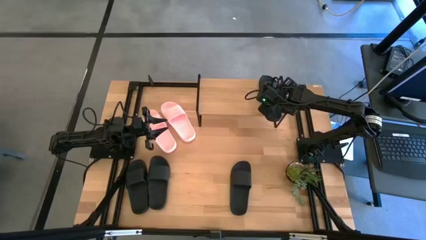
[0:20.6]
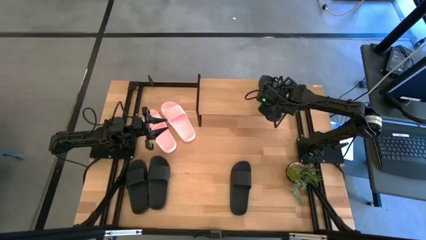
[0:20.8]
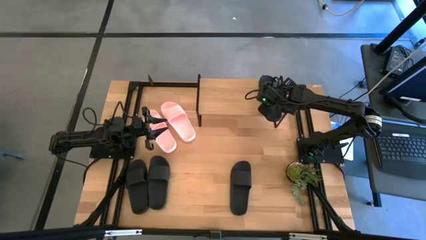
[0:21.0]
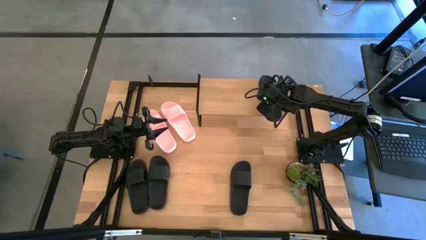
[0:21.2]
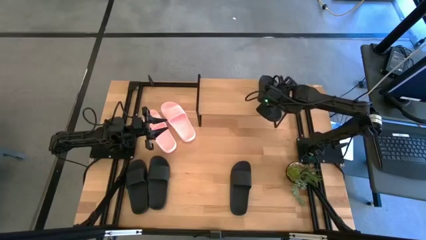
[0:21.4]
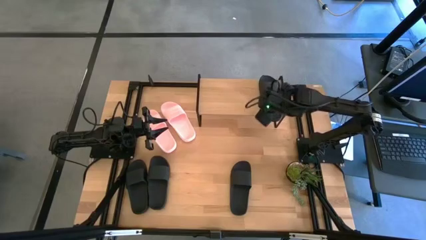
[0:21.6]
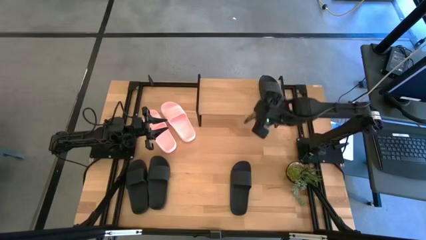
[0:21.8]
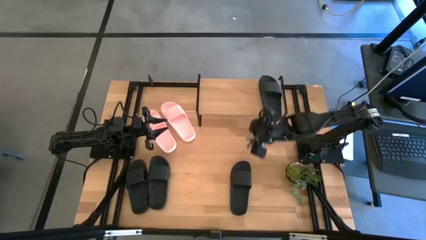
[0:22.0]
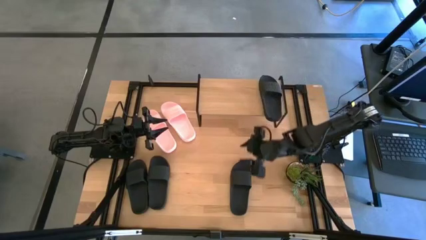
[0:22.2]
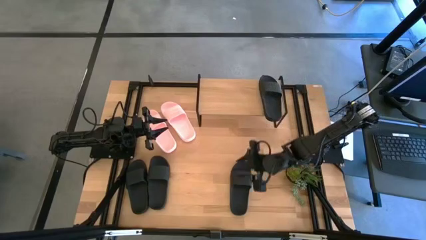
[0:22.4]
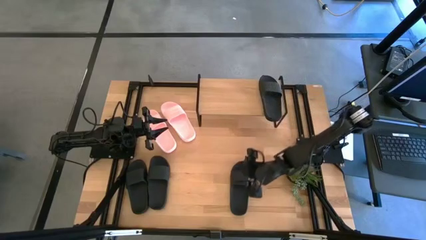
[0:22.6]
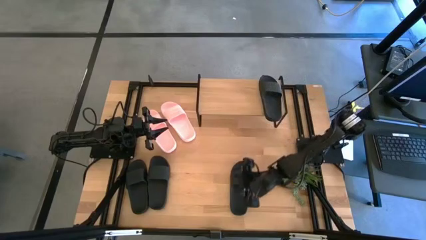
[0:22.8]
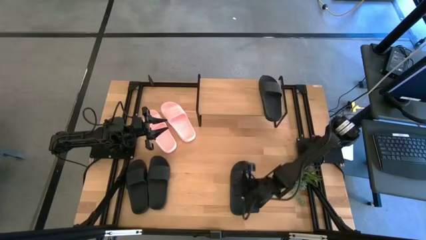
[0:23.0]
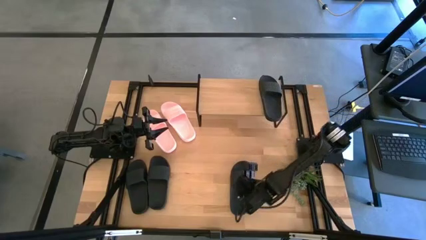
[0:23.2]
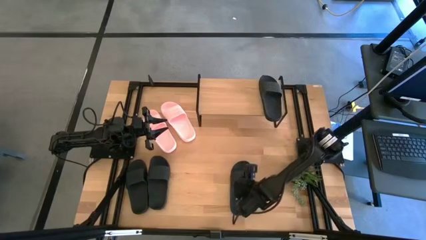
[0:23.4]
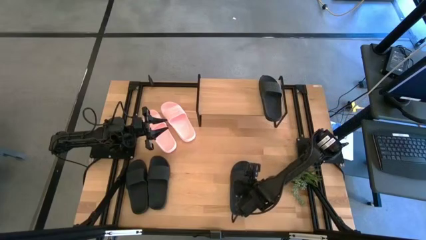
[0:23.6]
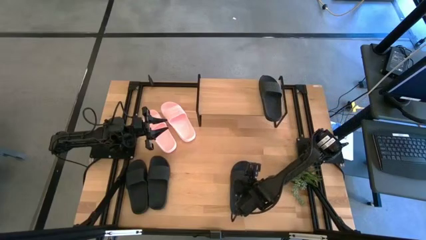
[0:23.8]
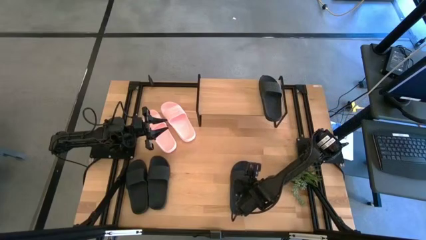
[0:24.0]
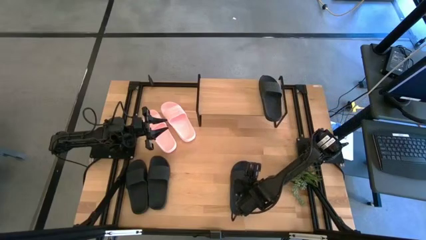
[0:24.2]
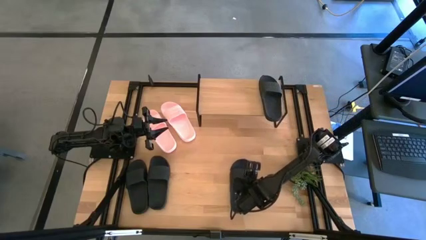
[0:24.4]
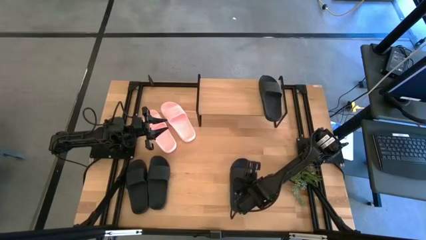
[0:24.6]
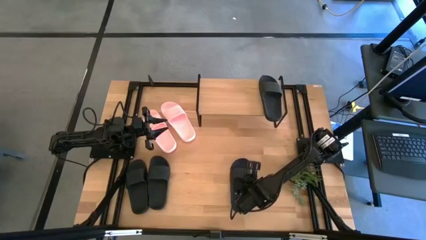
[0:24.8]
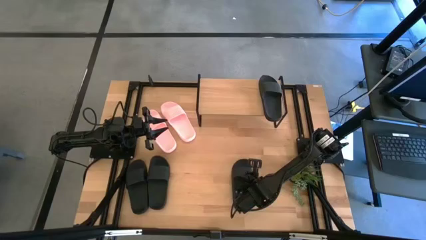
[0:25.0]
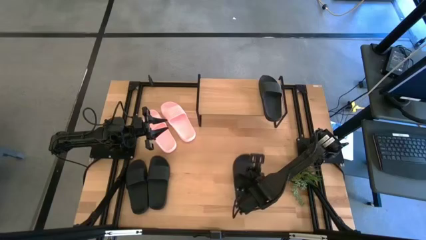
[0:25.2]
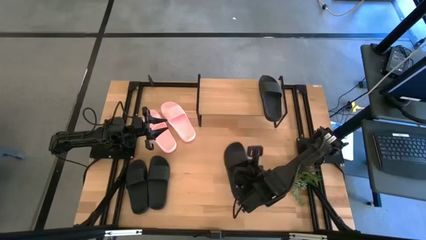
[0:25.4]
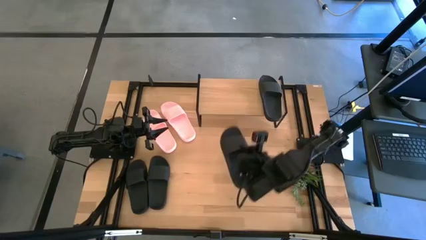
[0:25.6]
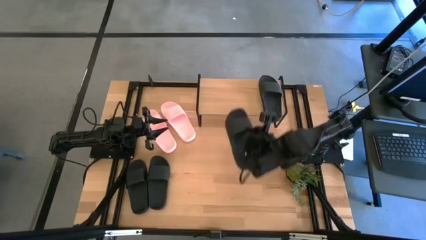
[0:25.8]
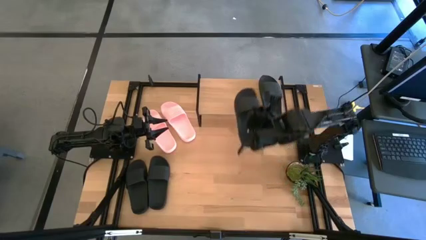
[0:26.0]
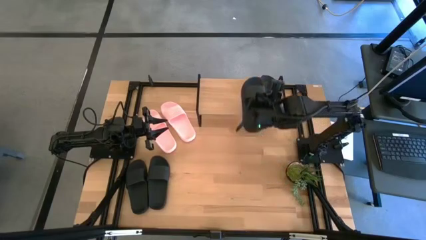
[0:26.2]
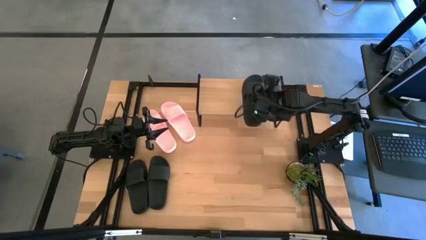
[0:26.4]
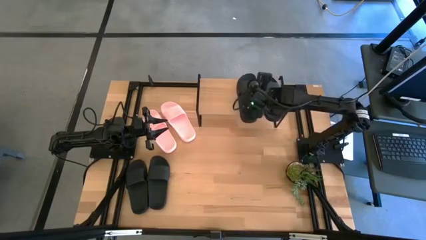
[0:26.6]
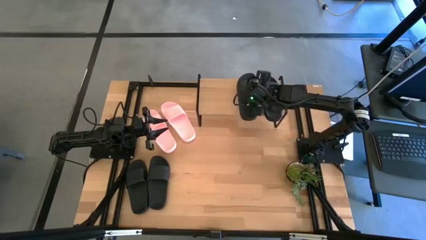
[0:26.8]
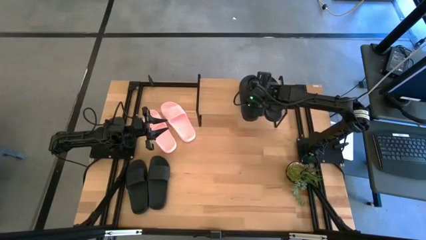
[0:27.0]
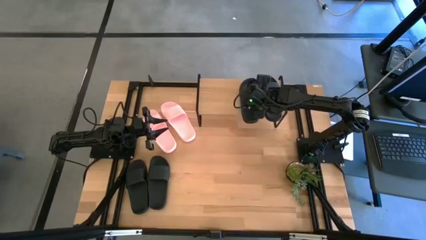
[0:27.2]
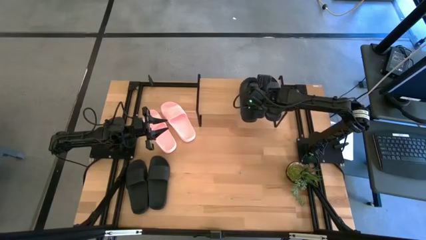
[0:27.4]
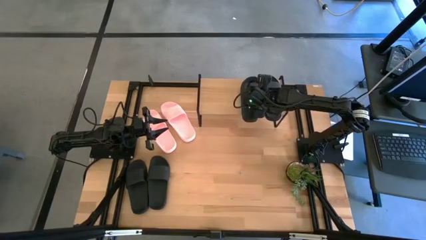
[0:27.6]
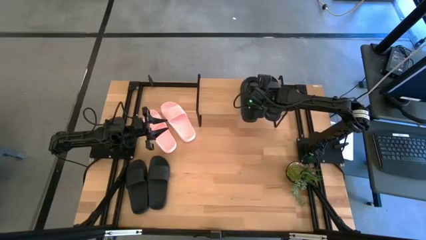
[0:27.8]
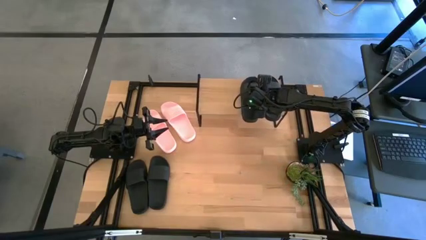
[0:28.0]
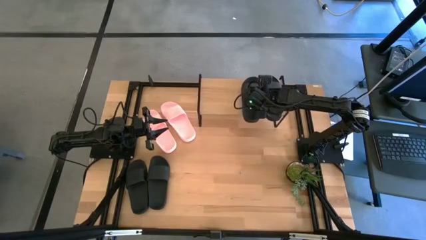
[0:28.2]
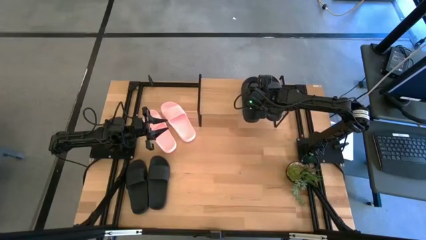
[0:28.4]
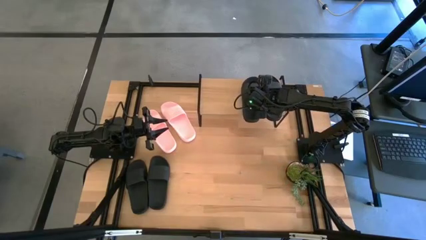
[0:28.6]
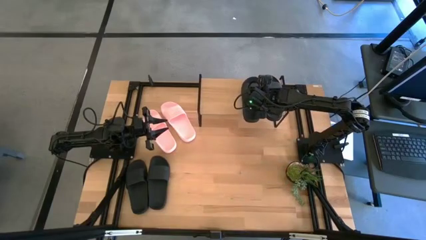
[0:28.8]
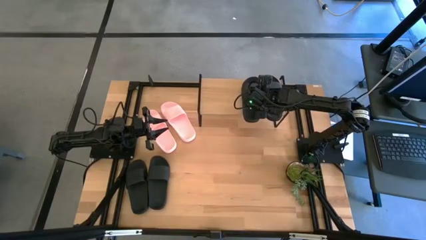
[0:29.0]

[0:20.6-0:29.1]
Task: Pick and place slides into the shelf
Put the black slide on the shelf

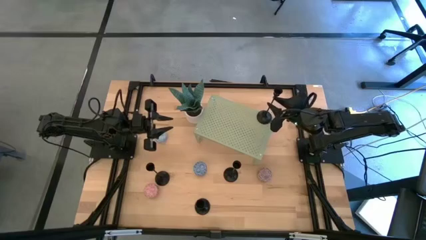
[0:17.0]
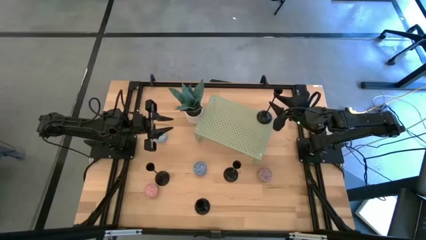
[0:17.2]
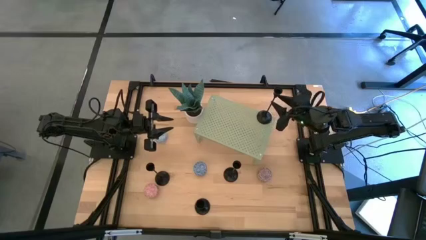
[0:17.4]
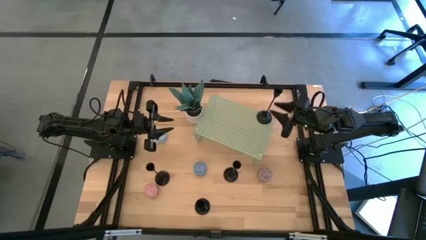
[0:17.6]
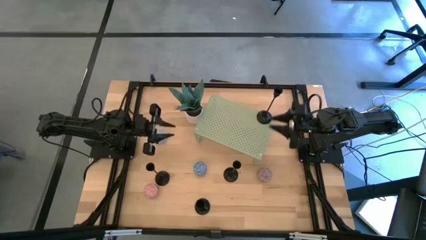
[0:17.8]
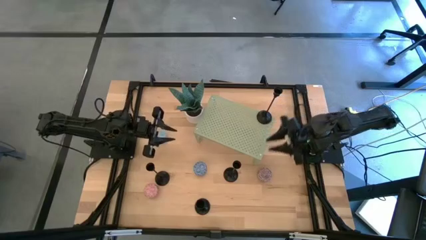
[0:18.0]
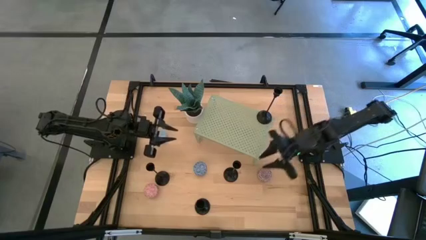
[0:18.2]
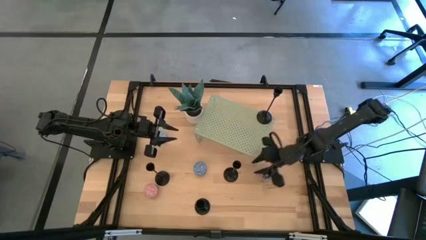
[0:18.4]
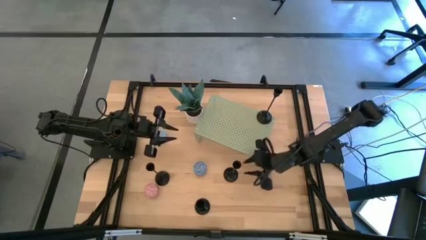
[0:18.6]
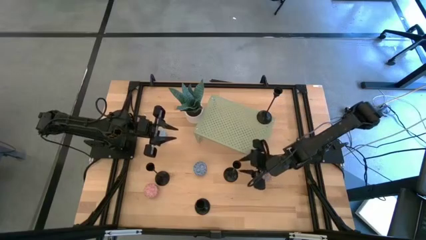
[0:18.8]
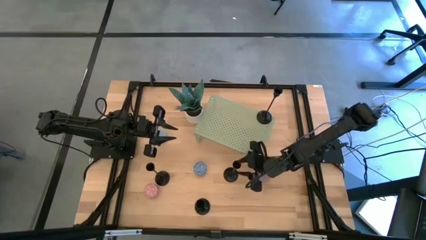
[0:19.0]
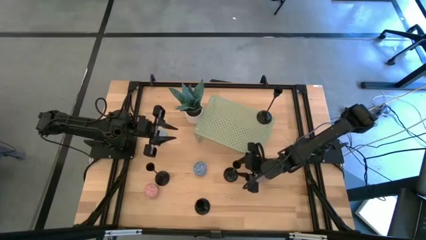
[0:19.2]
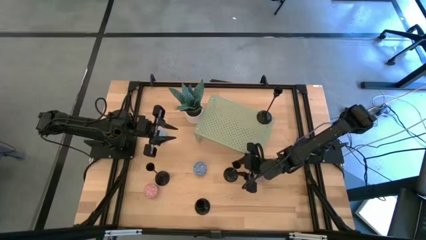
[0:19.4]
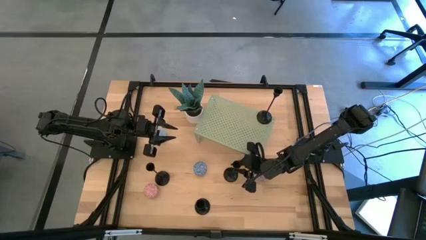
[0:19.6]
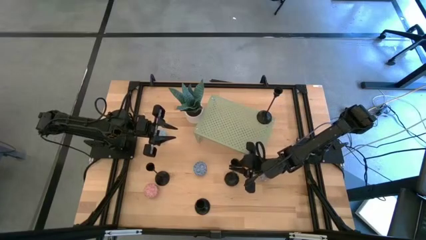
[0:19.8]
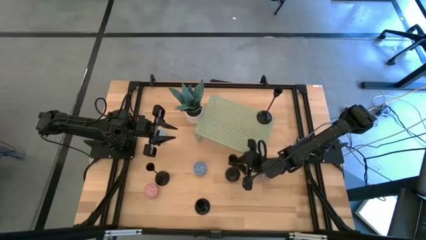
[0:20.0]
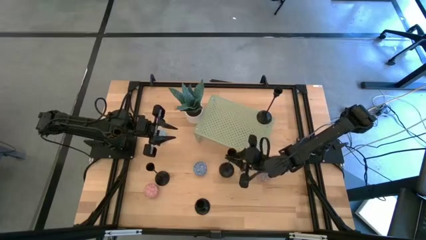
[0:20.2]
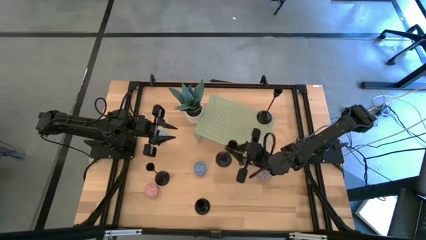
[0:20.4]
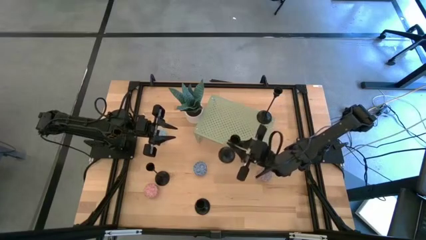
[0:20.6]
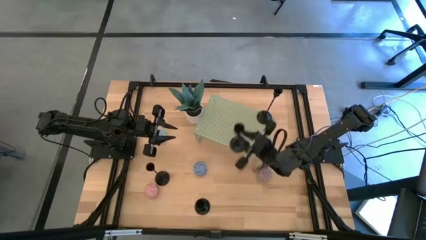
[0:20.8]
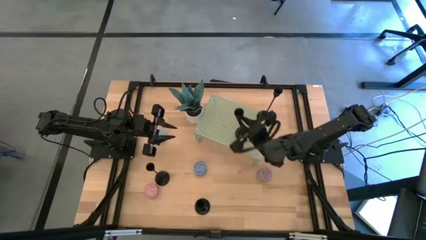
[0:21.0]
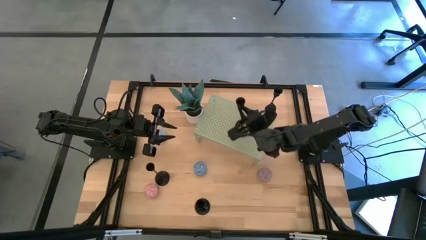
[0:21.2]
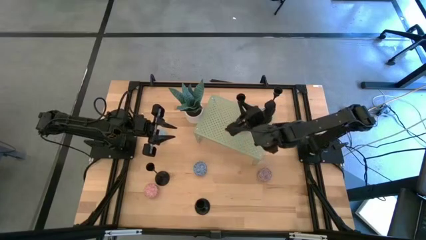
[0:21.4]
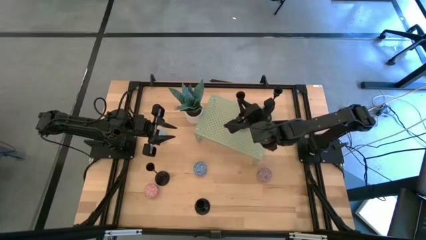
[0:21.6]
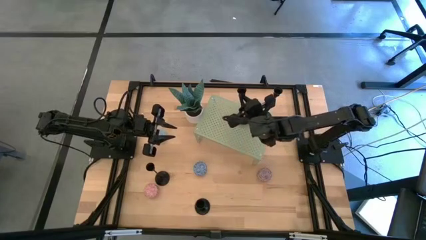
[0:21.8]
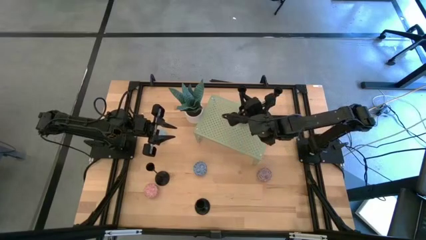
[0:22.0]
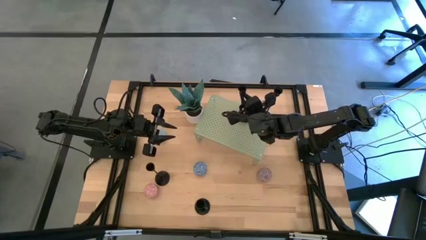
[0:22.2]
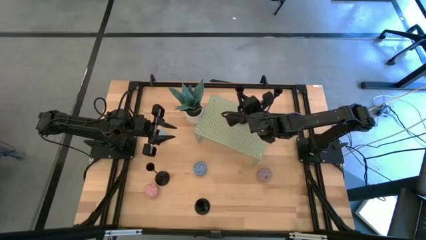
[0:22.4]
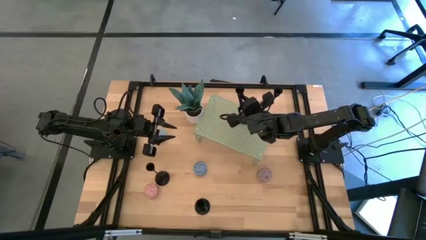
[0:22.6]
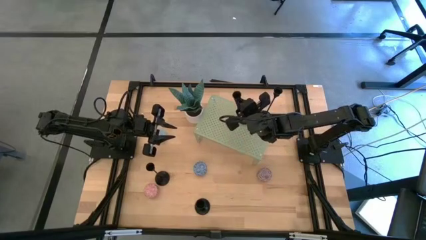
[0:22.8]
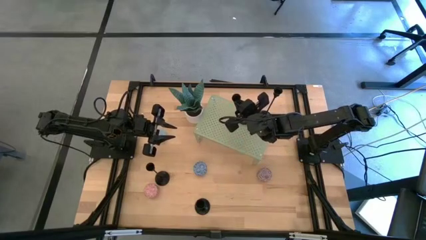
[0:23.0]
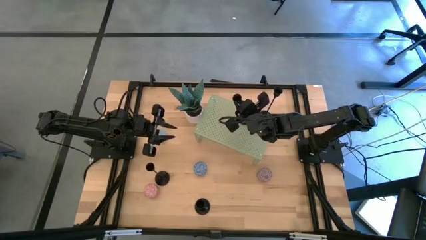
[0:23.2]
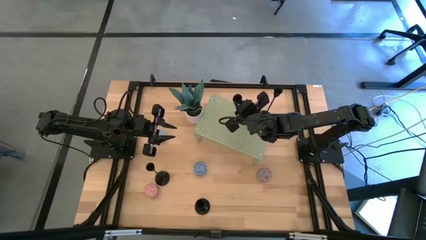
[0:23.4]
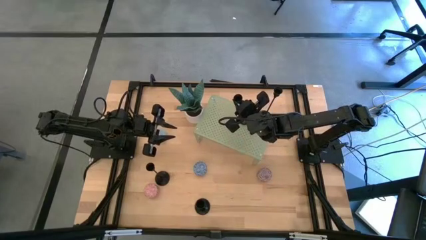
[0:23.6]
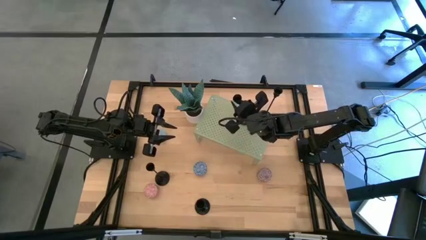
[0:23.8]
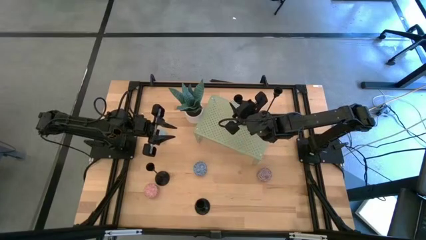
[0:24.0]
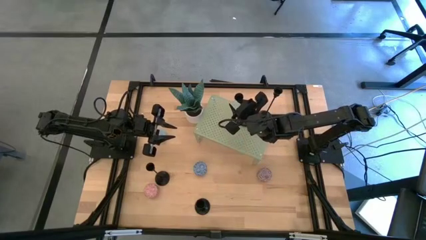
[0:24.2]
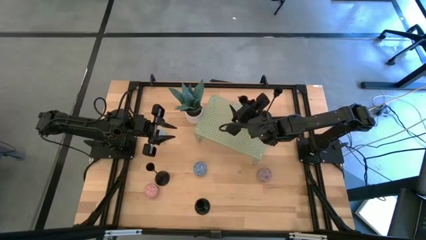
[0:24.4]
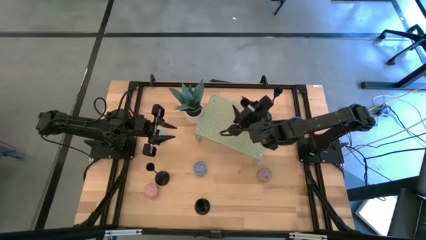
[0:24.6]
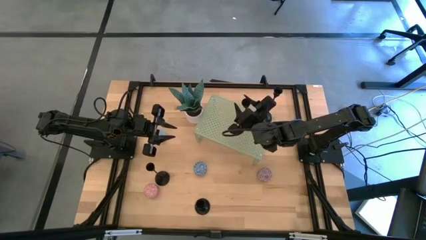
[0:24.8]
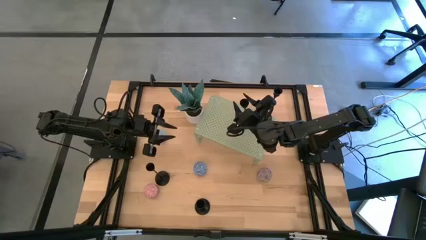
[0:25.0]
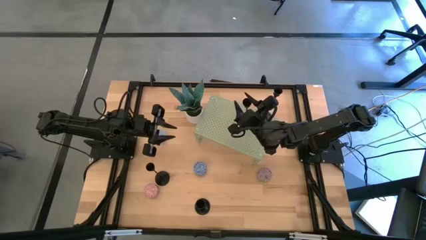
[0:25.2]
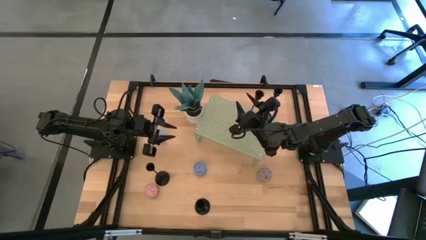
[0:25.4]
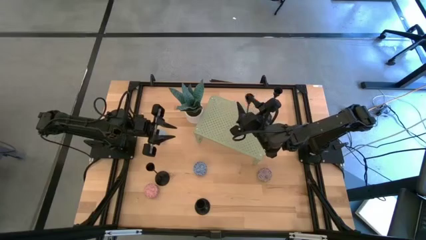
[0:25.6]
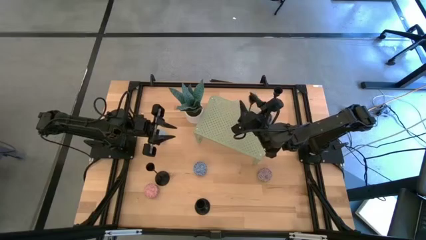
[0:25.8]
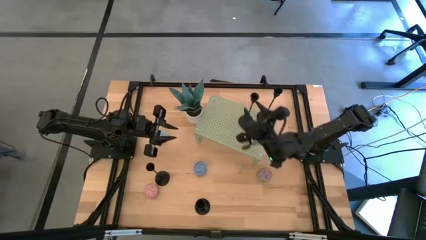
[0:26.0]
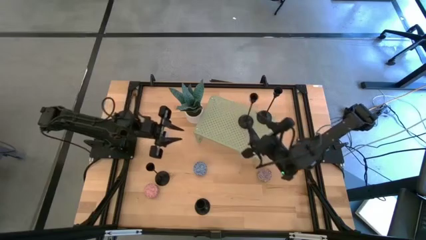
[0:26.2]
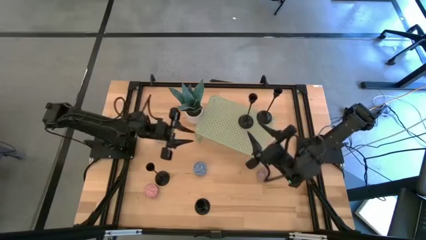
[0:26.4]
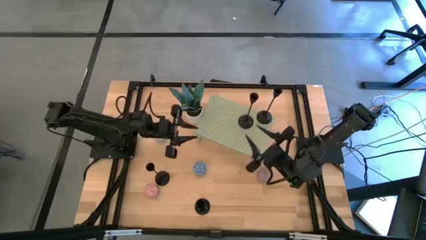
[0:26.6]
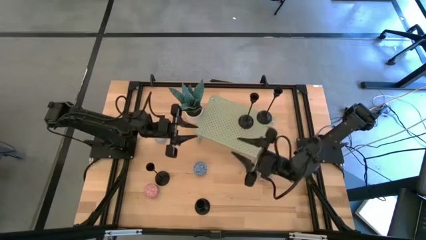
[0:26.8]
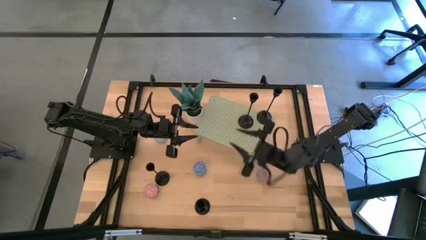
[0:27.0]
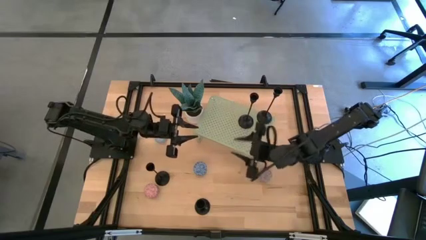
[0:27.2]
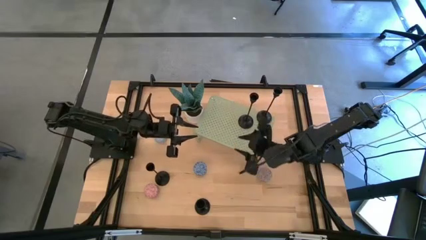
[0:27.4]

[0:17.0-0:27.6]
Task: Stock candles and holders on shelf
Align the black candle holder with the other black candle holder on the shelf
